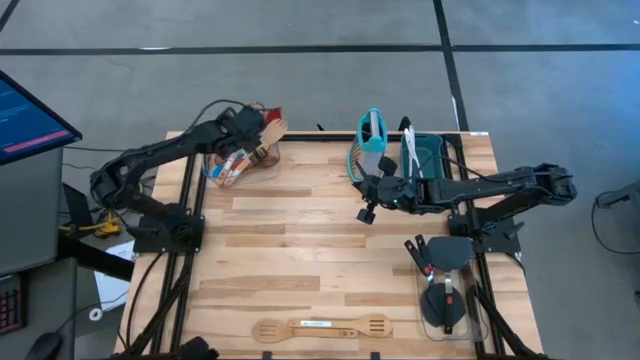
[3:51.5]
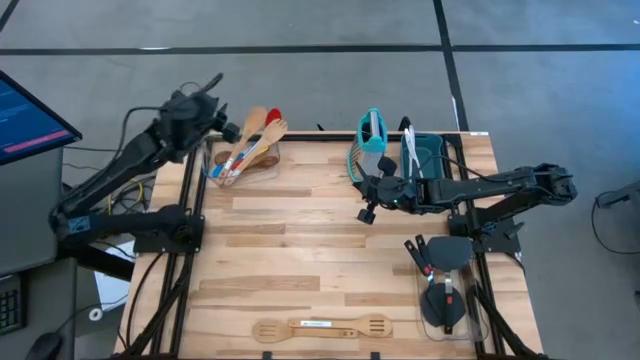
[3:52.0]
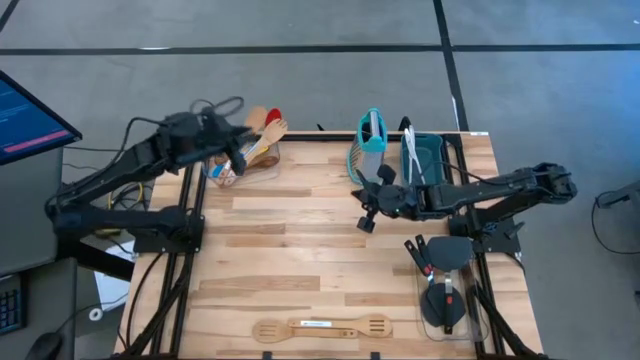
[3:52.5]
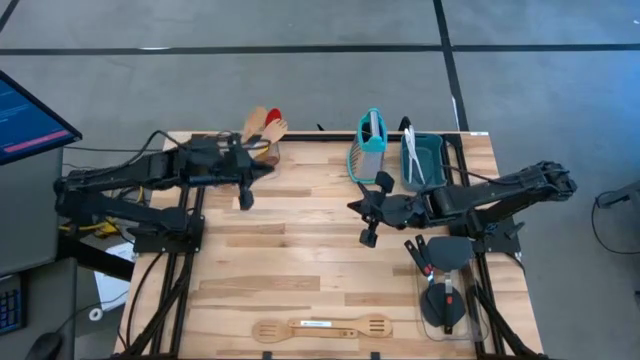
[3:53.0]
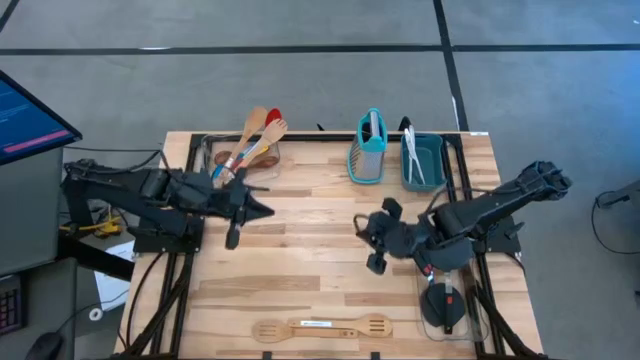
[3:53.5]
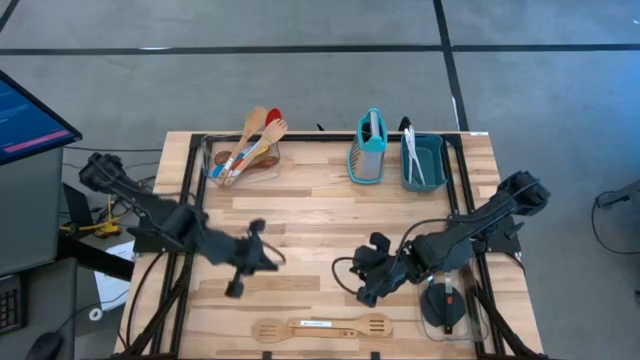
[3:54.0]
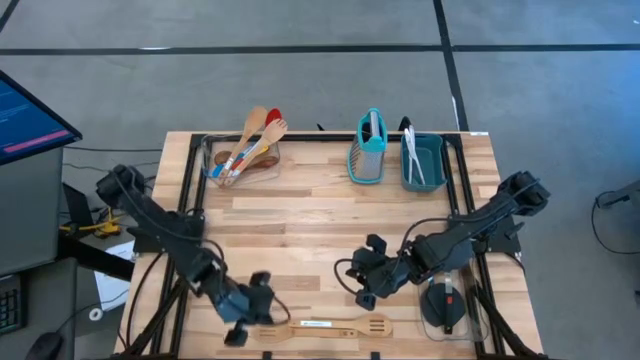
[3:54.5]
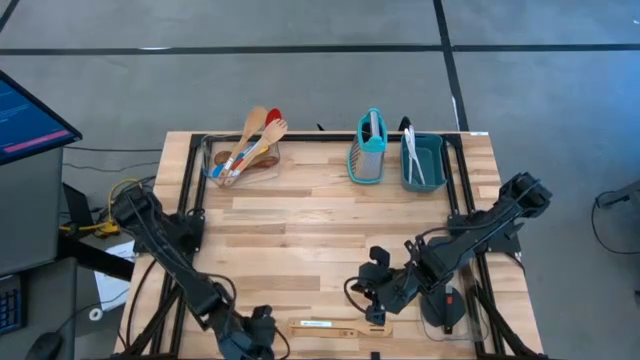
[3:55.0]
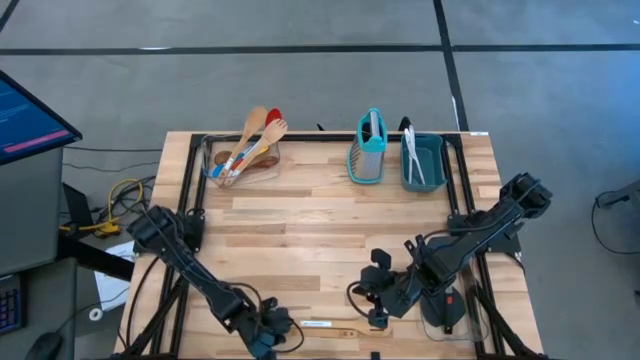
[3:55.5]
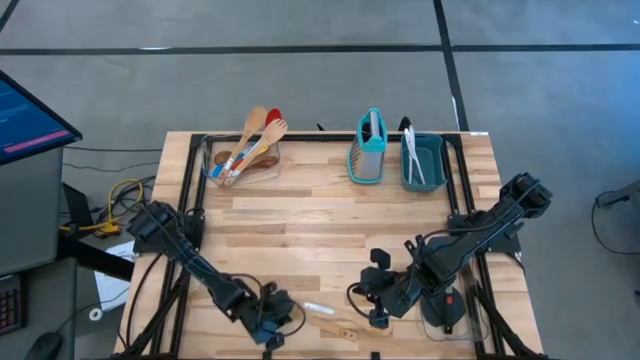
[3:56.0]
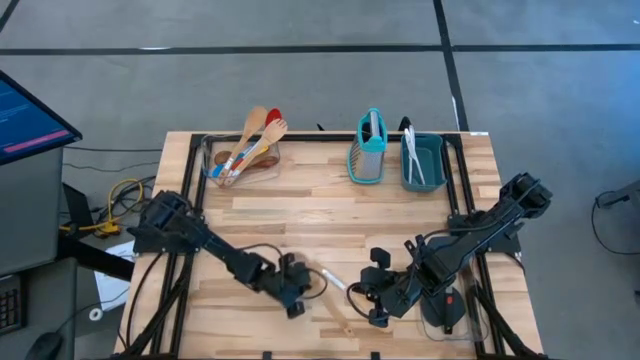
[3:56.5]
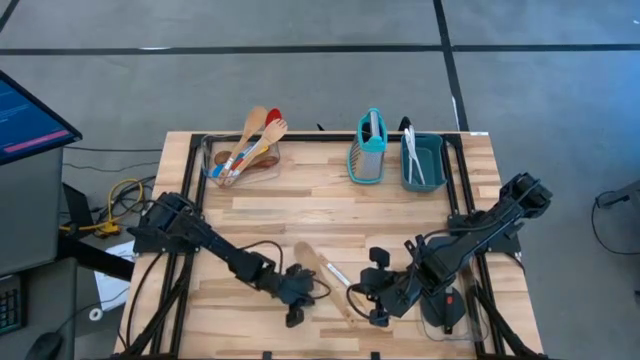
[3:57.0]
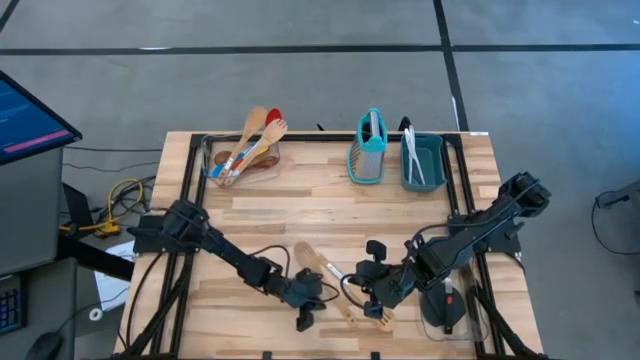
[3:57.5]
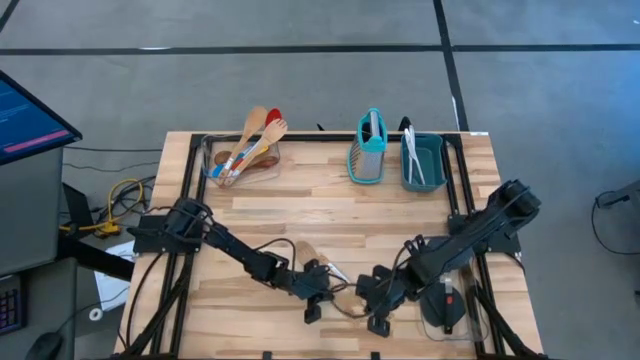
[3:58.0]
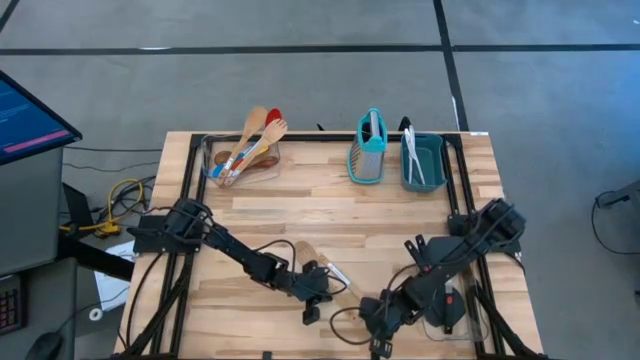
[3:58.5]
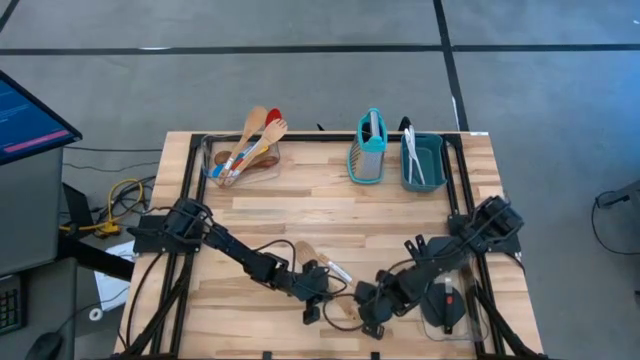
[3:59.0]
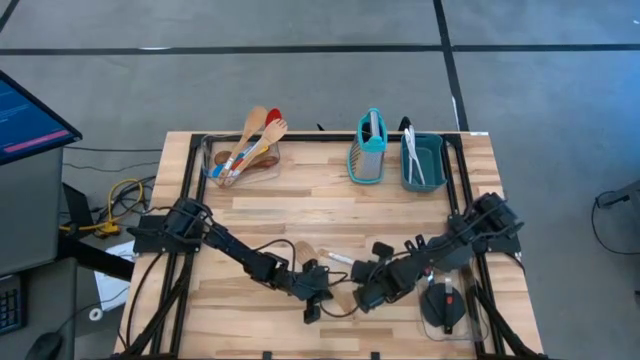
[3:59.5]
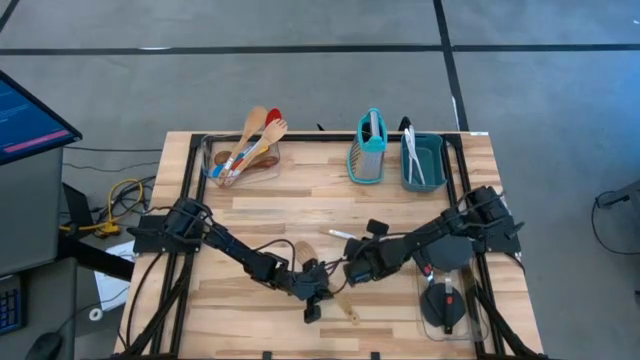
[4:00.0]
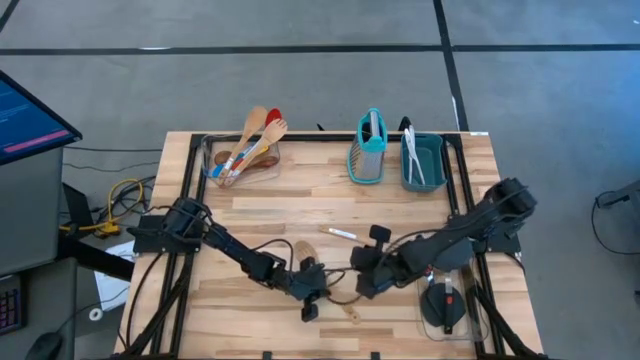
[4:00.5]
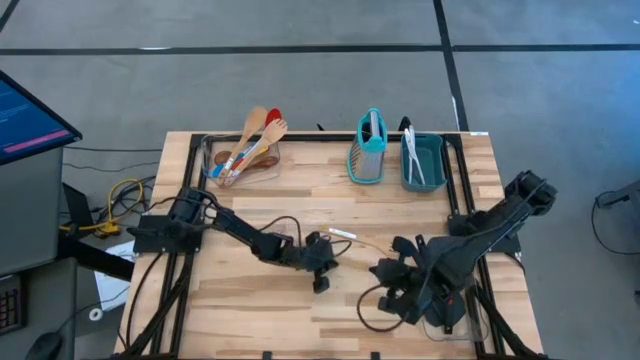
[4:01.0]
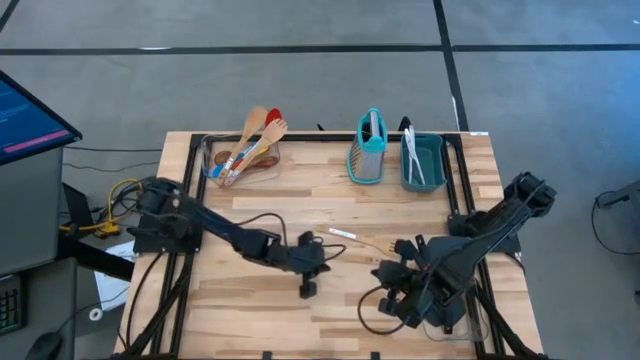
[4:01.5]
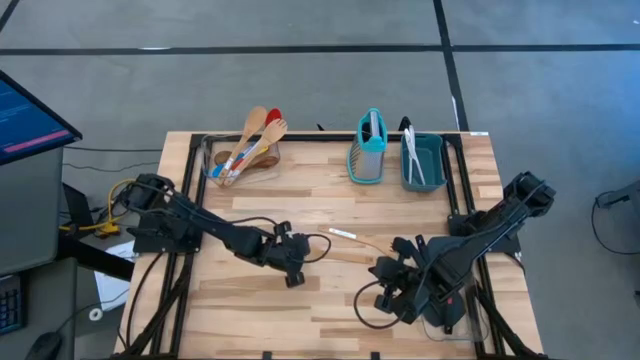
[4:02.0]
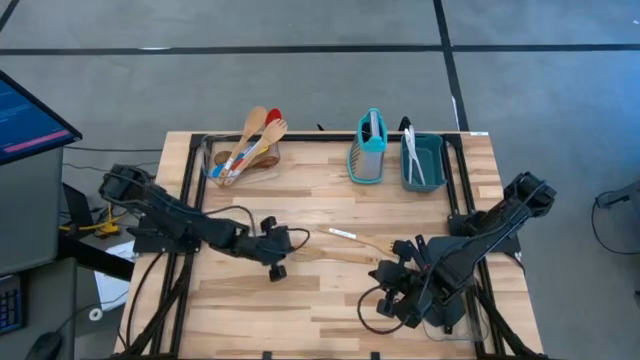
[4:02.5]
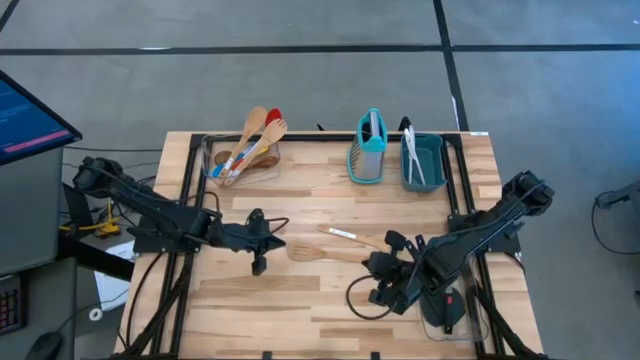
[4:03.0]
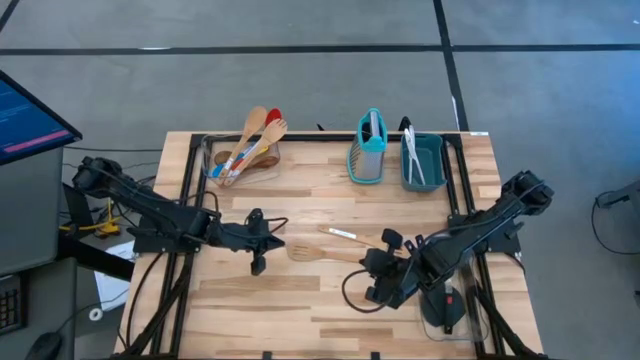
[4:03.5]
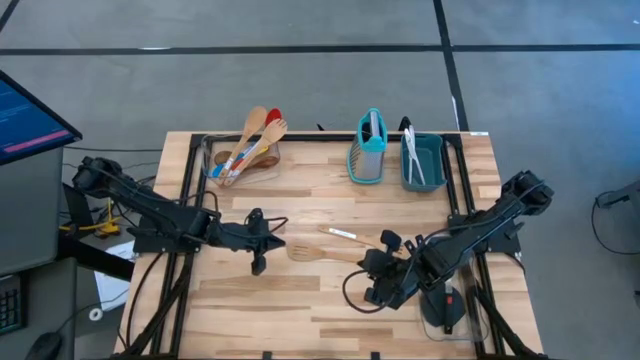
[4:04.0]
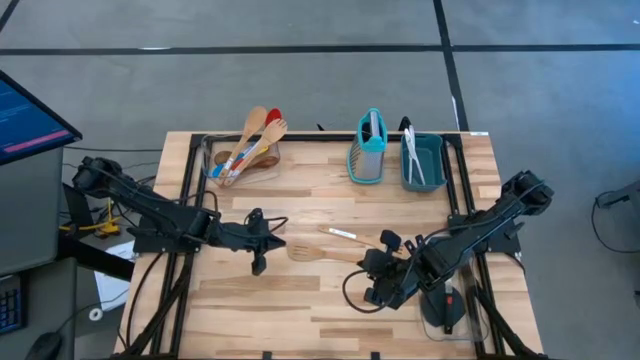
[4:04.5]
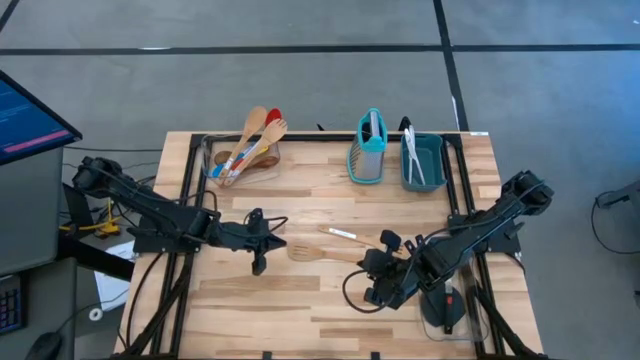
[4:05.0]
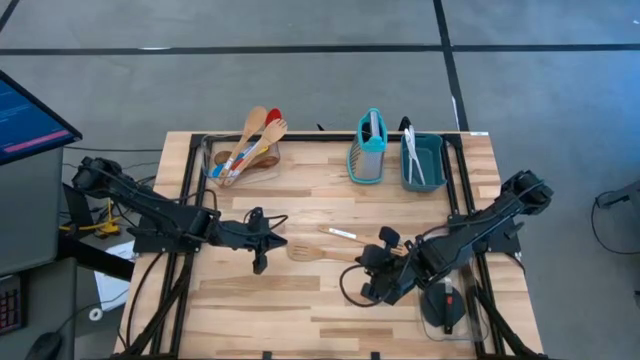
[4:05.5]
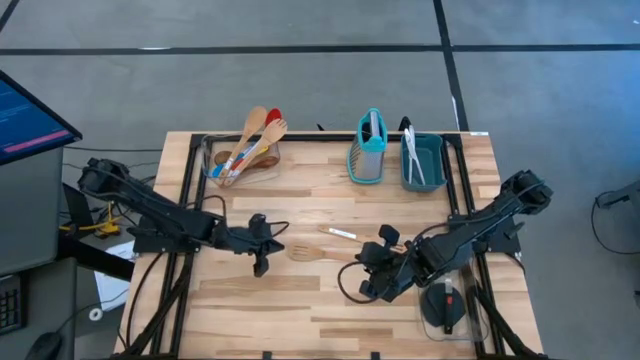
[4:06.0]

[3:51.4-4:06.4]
Task: Pick & Place Kitchen Items
Put the bottom wooden slotted spoon into the left transparent bin

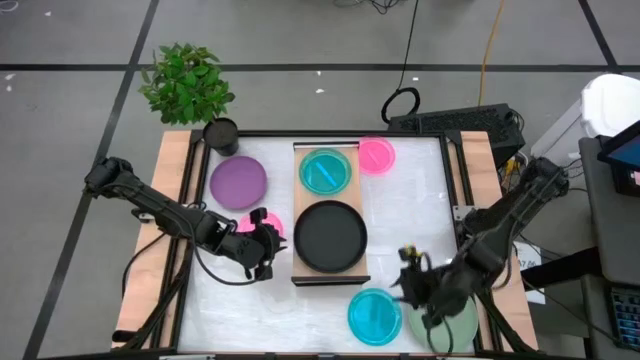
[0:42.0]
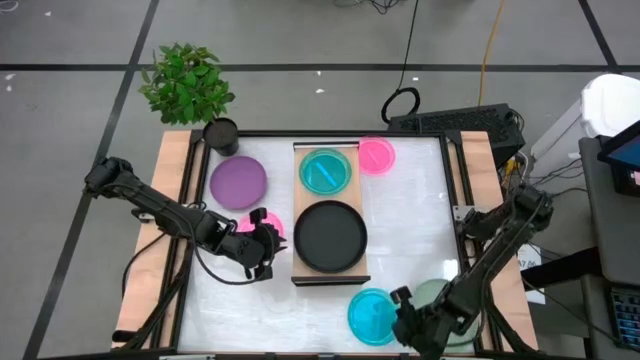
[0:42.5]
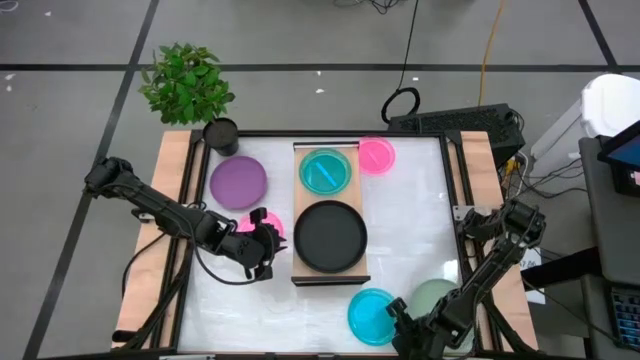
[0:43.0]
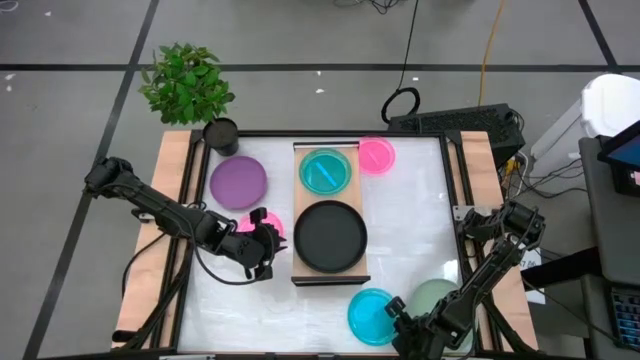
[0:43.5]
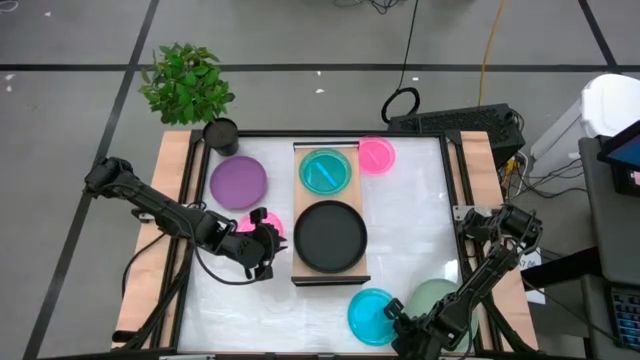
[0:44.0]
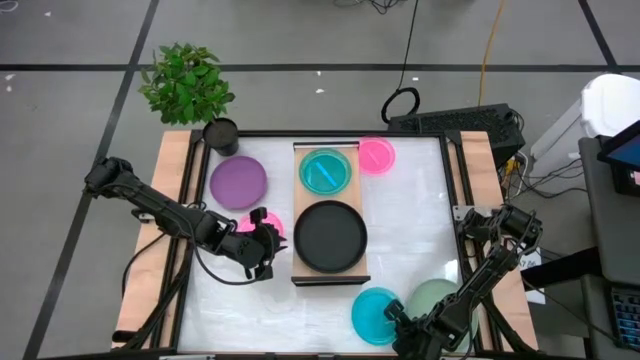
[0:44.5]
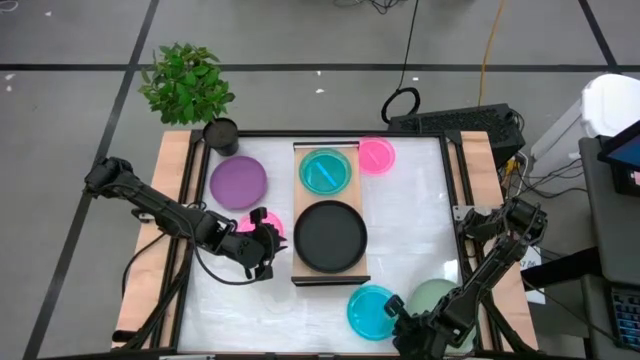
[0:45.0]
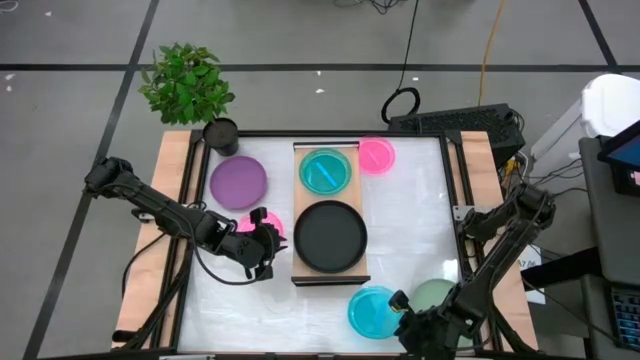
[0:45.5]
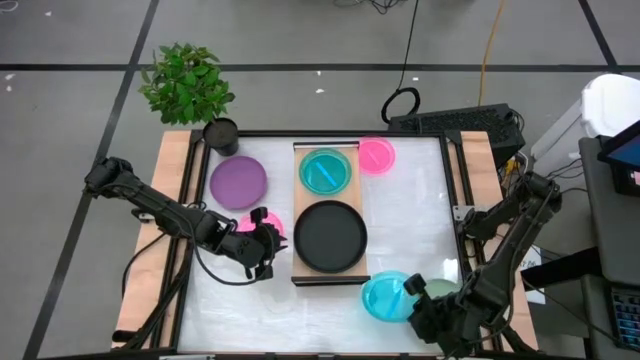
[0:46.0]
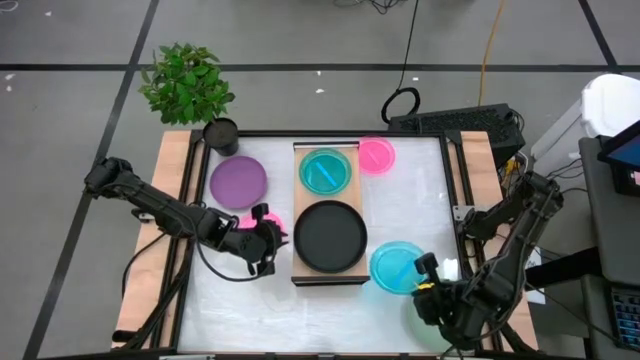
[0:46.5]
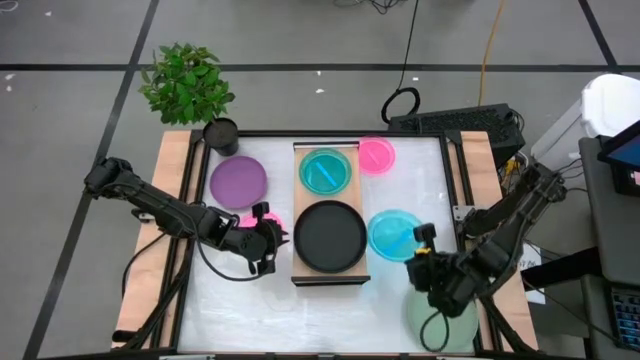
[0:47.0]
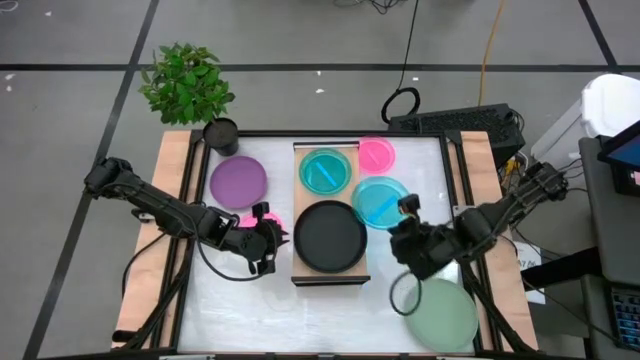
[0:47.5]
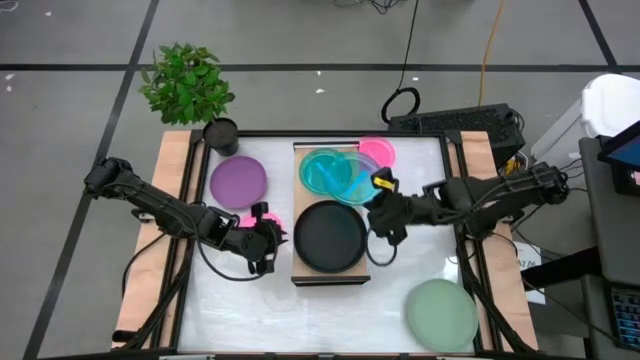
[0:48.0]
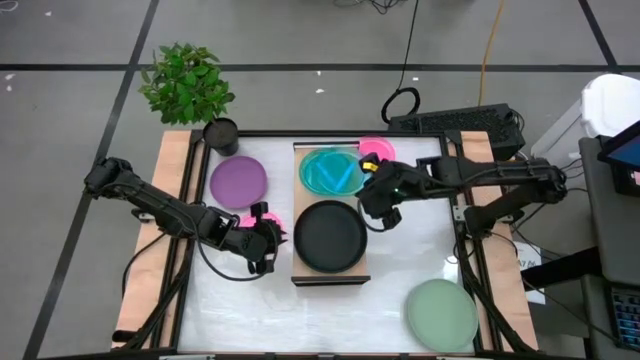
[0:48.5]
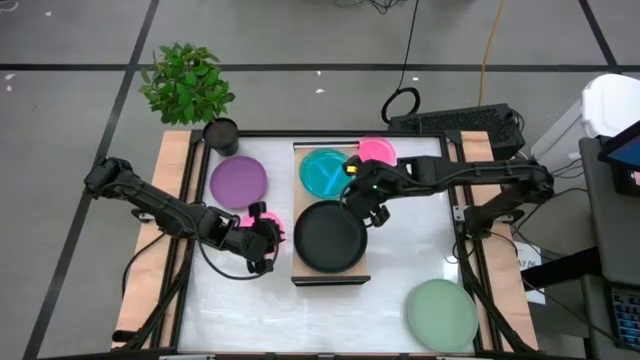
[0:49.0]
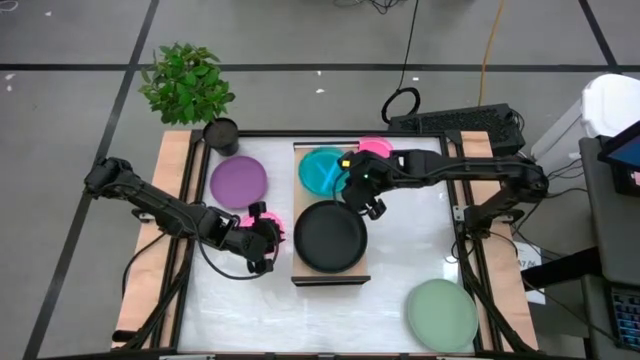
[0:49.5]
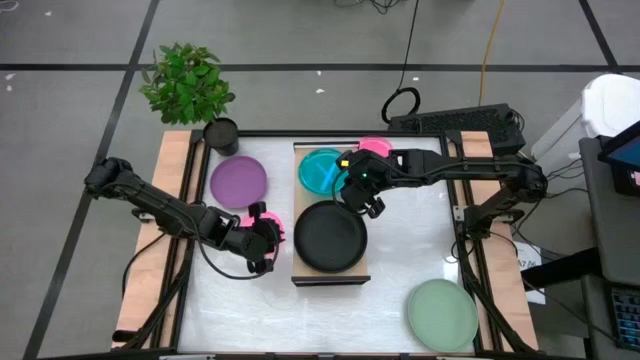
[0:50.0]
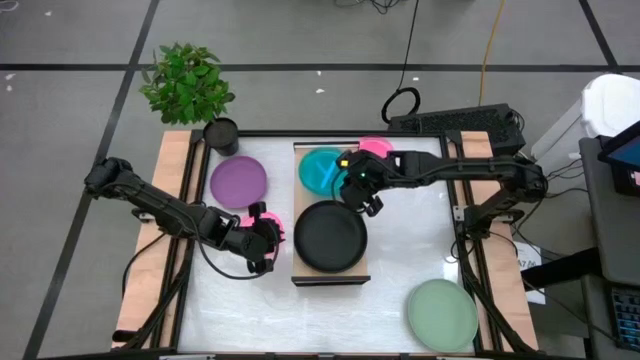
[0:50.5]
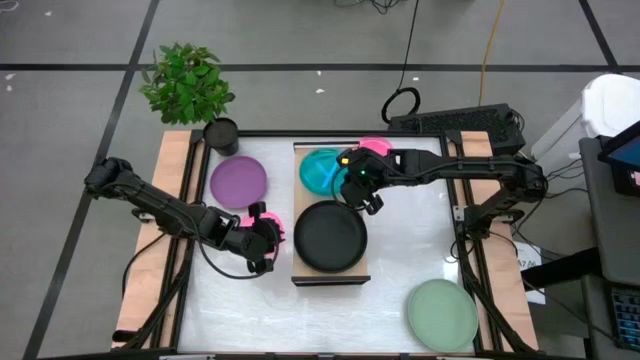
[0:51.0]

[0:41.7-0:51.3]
Task: Place and stack plates onto a shelf
Stack the blue plate on top of the blue plate
